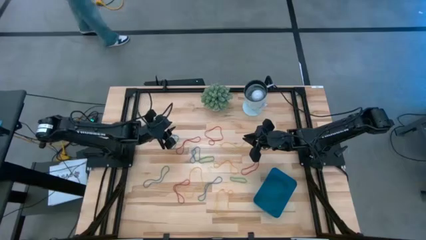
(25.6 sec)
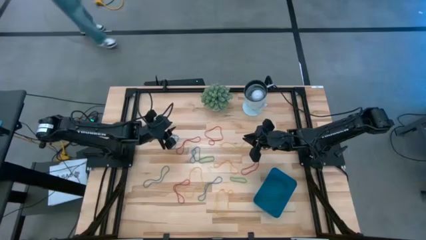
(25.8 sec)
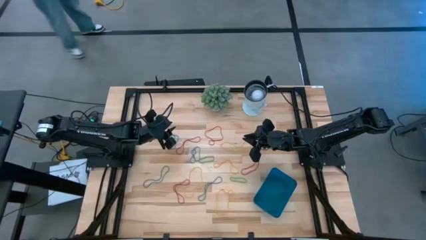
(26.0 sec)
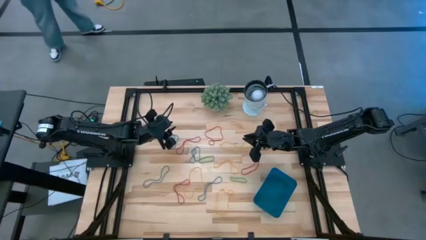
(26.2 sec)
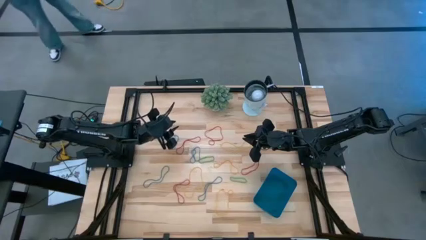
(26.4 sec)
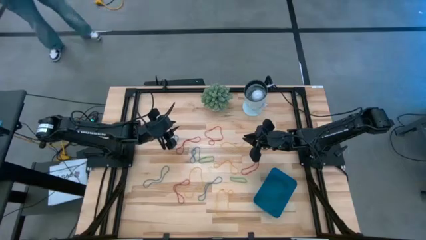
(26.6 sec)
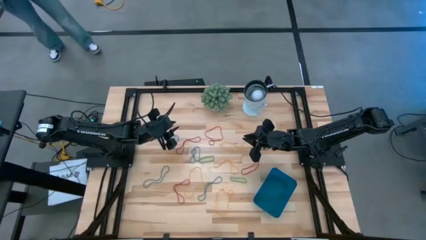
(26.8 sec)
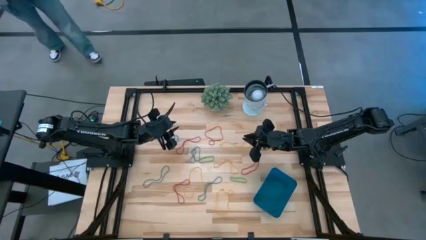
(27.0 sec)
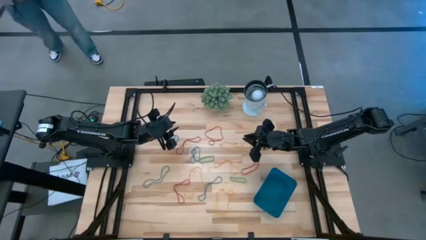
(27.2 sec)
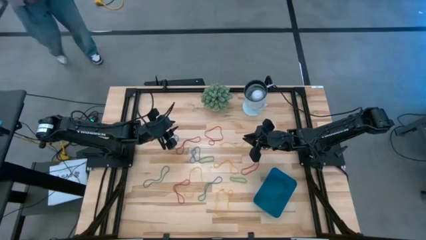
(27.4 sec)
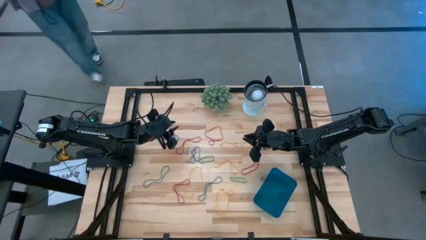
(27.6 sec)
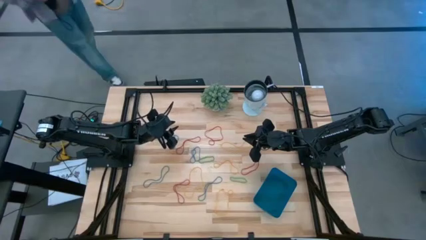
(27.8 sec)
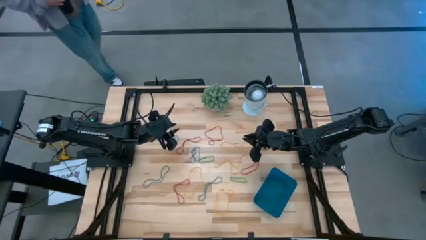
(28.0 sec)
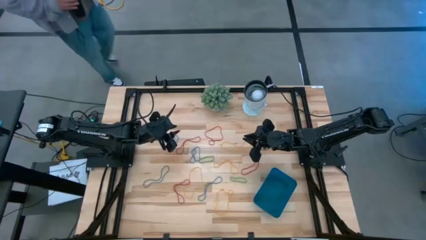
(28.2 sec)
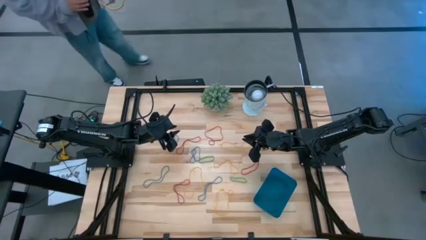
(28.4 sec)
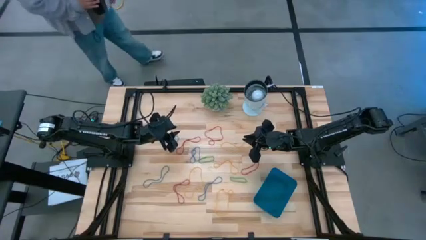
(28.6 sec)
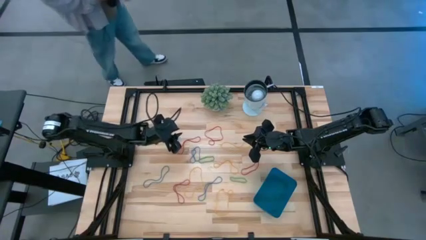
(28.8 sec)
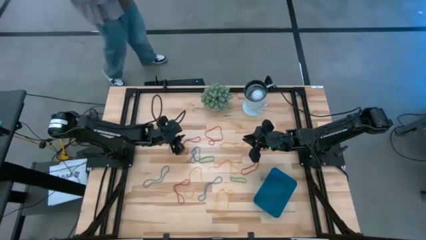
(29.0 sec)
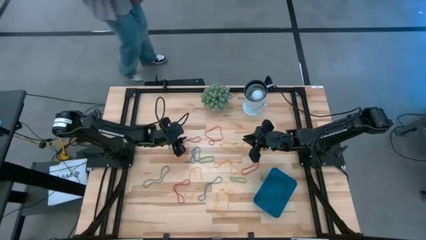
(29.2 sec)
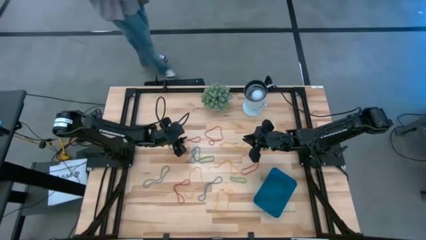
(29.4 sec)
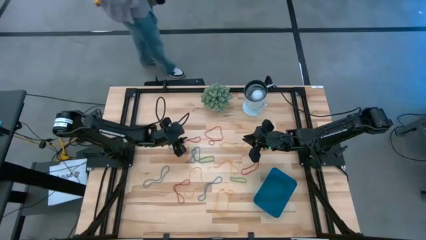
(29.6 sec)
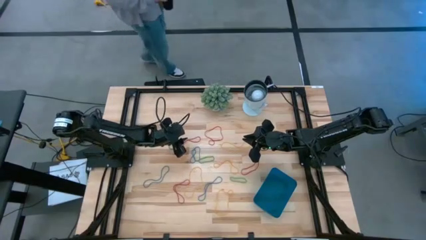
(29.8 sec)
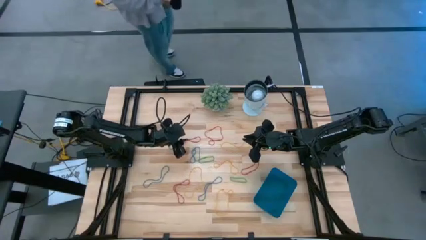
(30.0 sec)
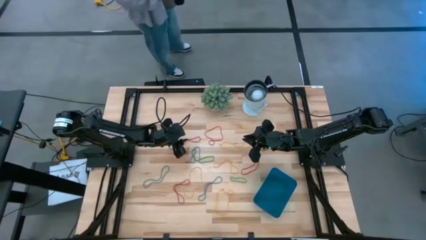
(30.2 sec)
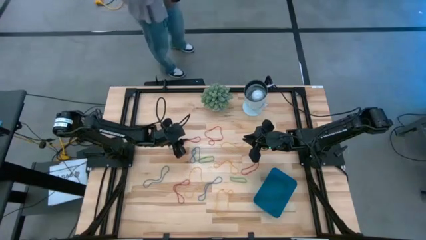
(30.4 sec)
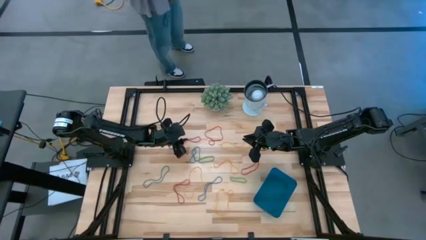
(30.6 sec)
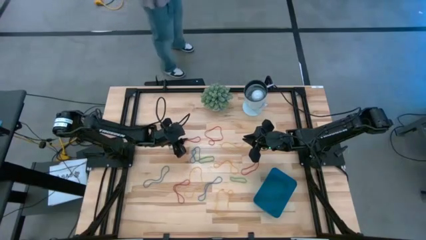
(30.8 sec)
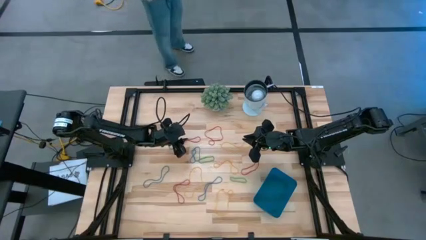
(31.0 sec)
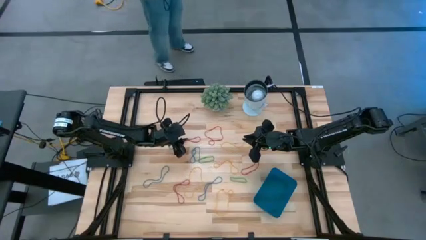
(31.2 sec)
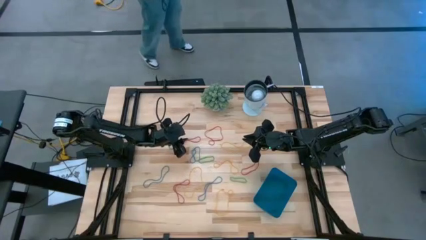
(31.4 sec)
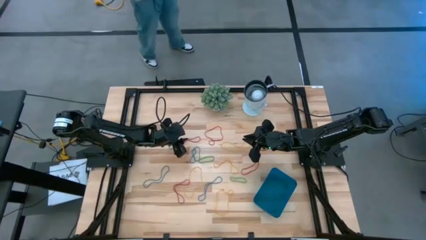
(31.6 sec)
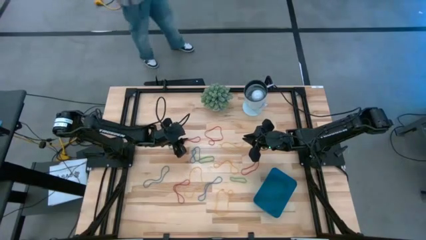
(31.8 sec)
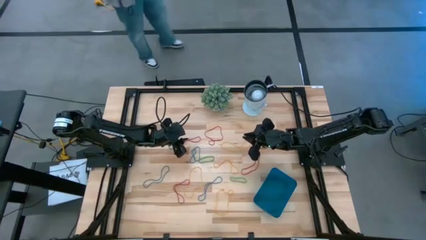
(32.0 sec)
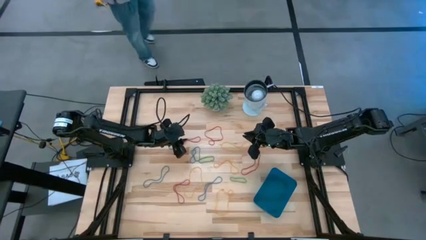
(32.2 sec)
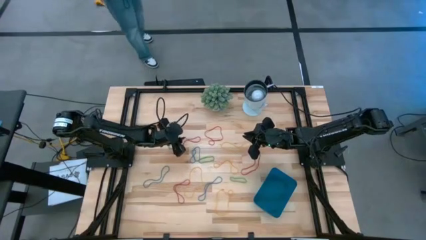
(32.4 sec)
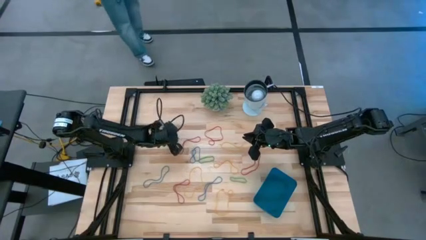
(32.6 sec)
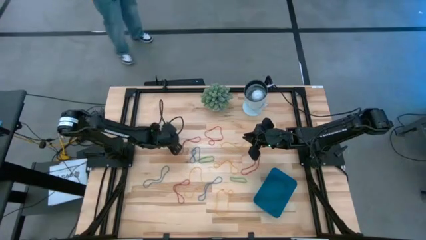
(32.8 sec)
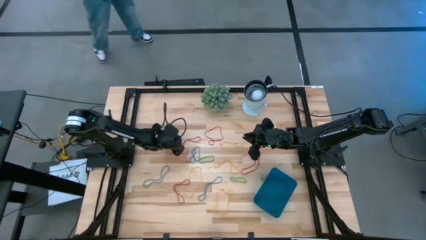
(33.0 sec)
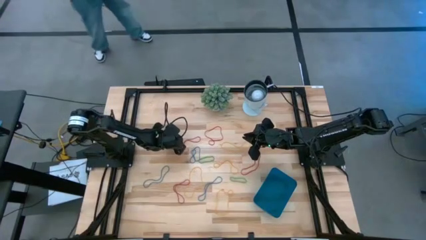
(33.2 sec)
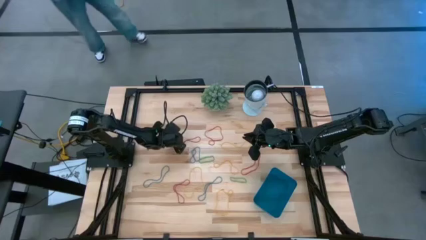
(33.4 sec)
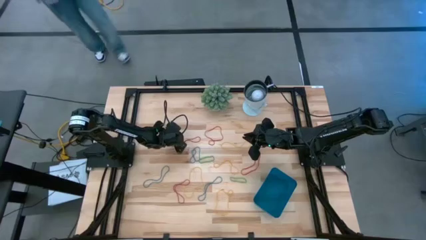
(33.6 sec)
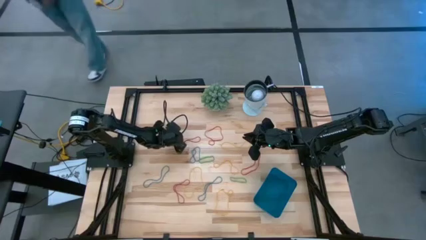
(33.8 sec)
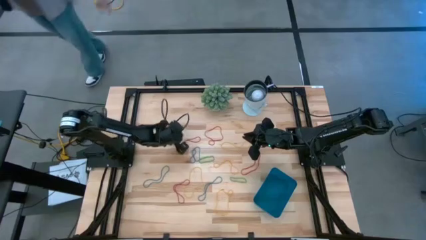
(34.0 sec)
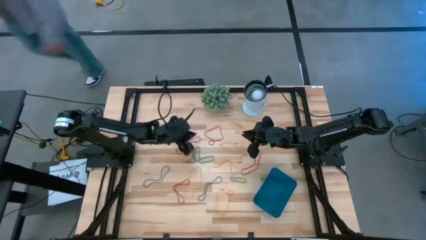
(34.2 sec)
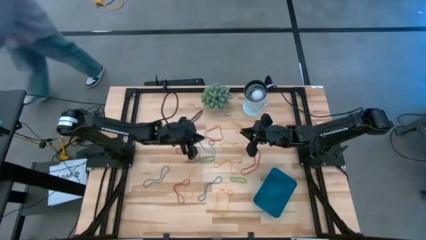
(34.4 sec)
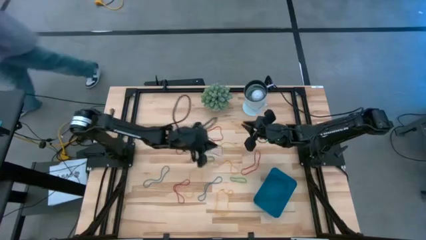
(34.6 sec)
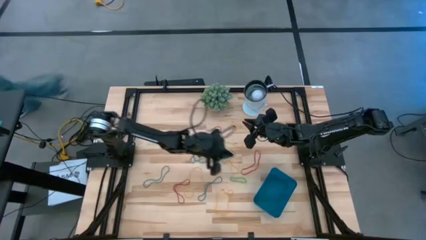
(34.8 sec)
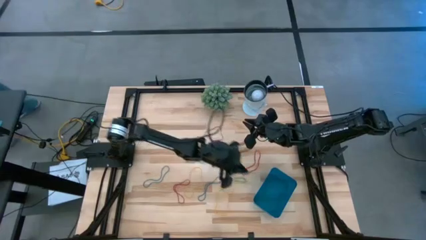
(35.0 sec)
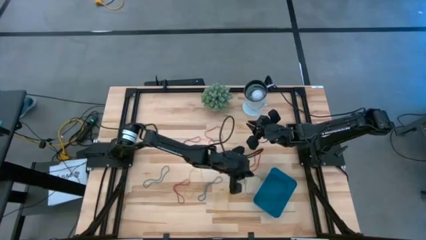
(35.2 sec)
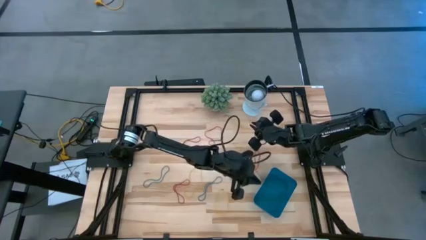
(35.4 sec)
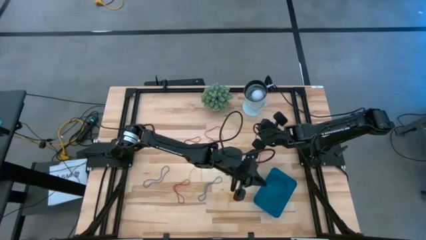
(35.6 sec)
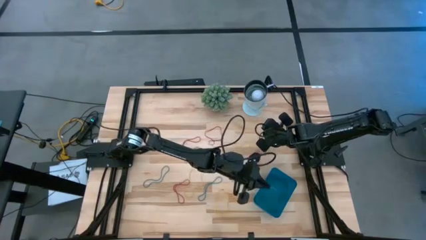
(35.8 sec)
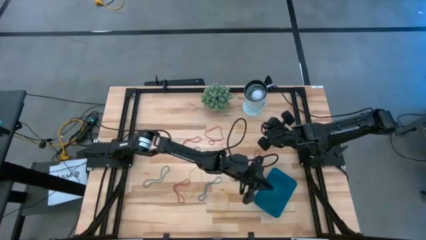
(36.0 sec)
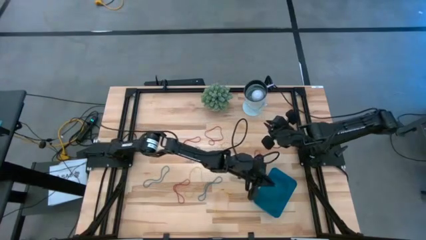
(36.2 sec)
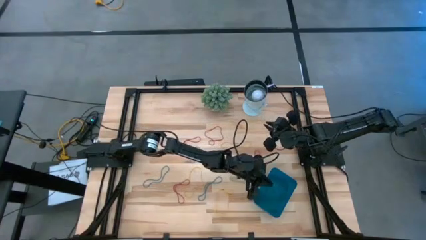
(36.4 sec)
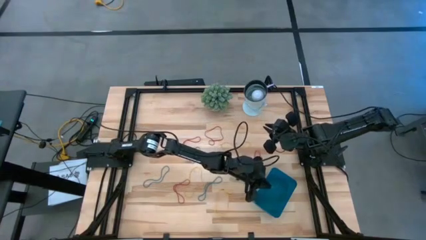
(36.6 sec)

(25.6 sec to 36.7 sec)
Task: Pick and place items into bin
Put the blue rubber band into the blue bin

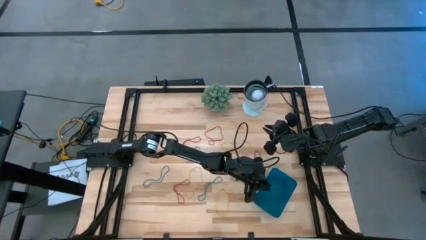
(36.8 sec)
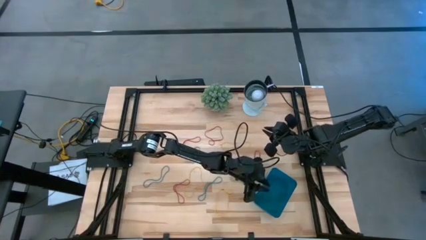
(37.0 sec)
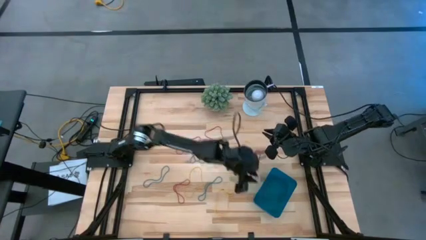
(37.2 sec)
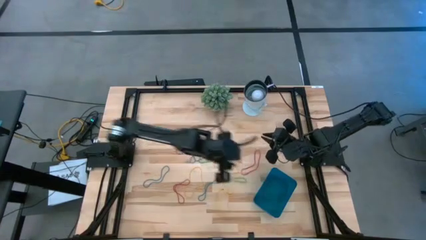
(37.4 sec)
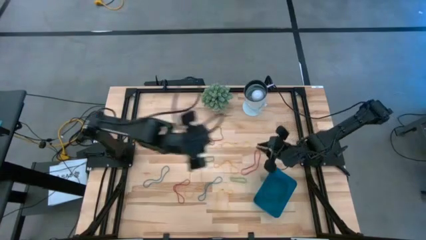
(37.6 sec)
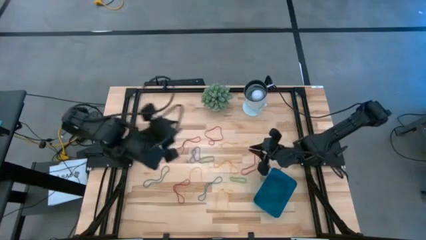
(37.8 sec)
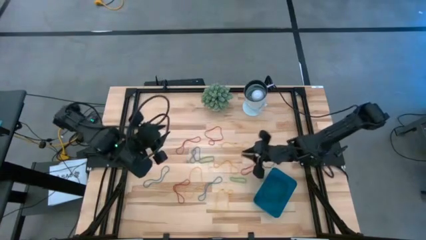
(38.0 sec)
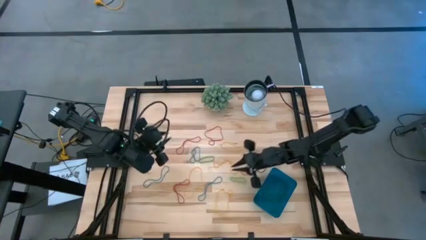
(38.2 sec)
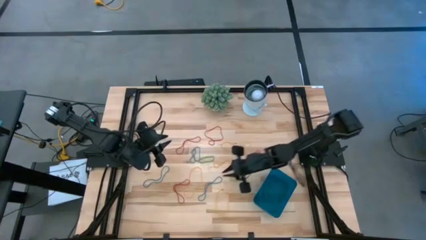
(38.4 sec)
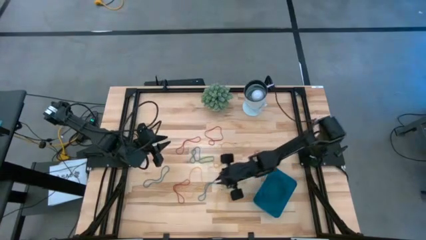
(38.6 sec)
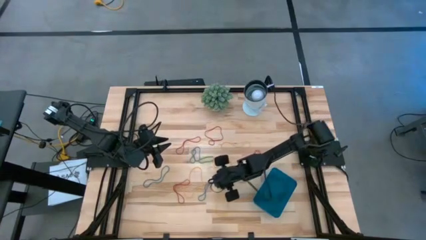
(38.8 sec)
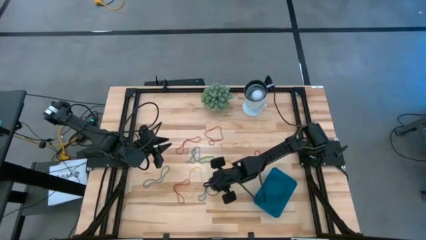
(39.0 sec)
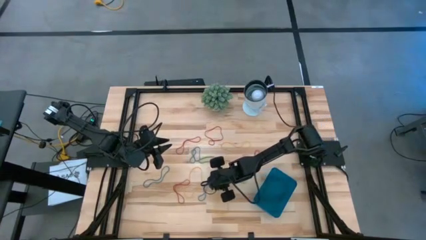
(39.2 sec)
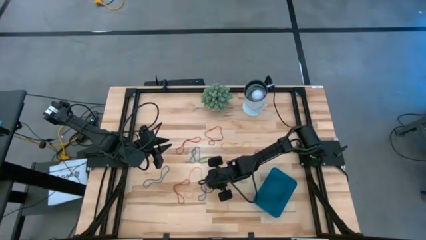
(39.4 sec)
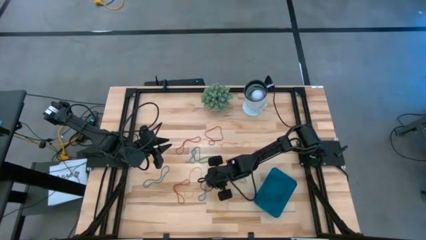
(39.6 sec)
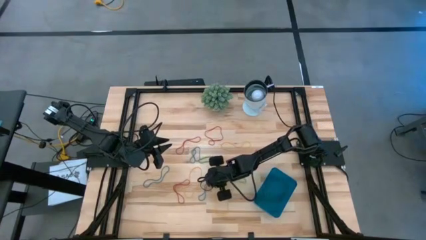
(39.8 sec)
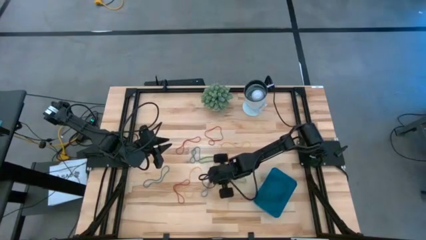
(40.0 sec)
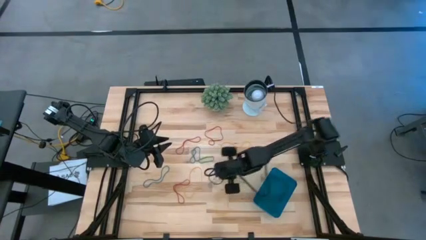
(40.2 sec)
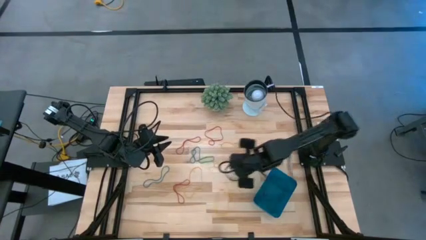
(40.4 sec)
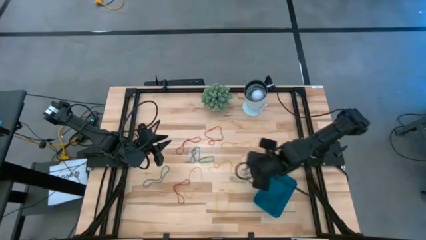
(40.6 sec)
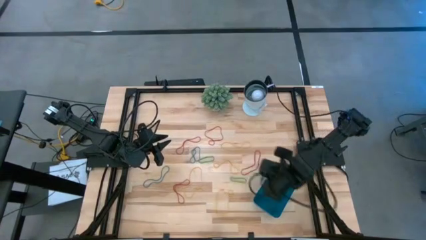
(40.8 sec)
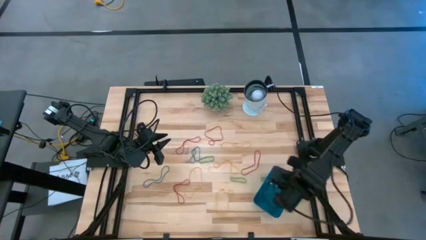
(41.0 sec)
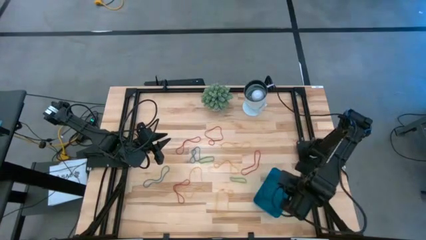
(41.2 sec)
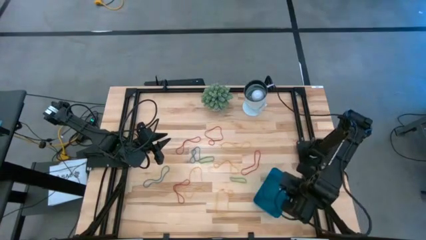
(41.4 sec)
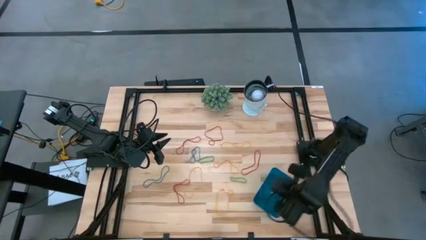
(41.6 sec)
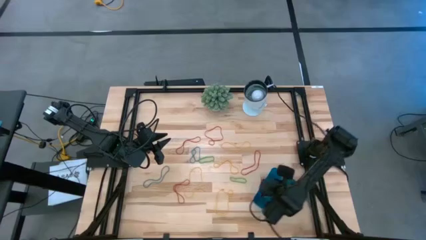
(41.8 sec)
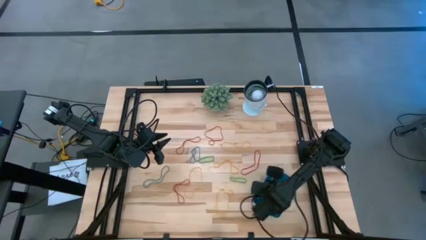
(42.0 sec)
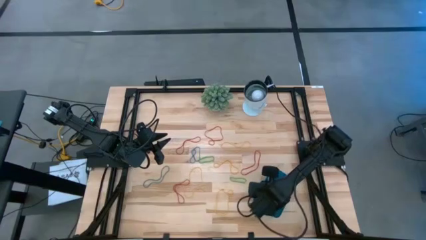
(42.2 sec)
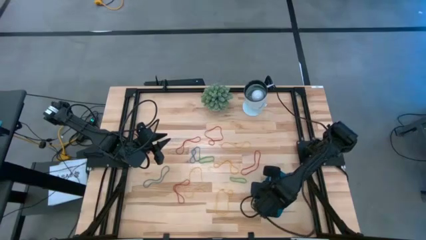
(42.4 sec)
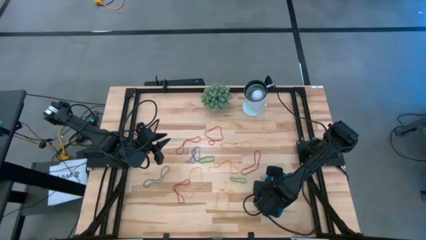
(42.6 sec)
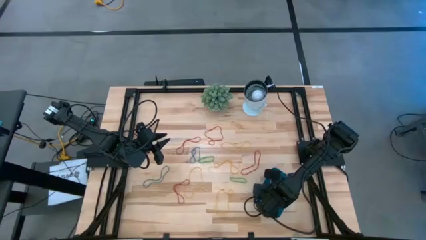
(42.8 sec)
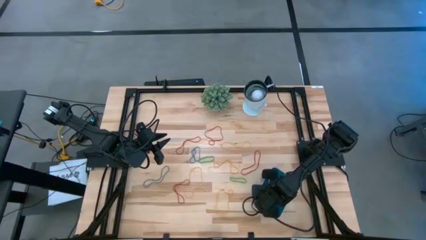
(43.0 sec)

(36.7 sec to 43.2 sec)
Put the blue rubber band into the blue bin
